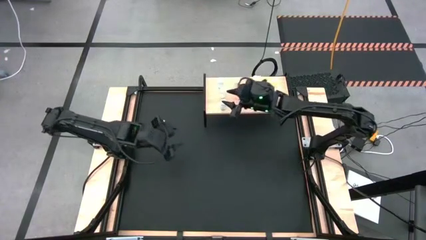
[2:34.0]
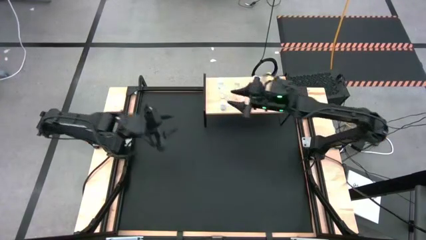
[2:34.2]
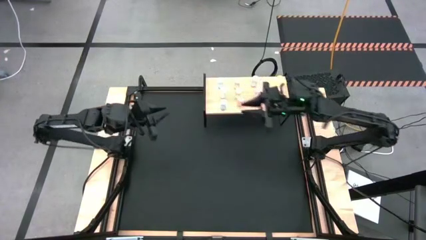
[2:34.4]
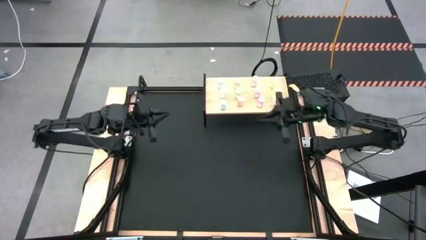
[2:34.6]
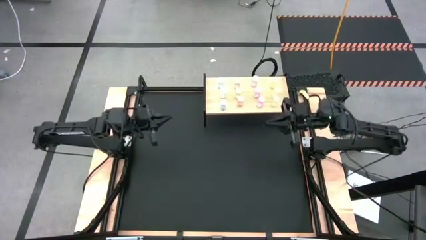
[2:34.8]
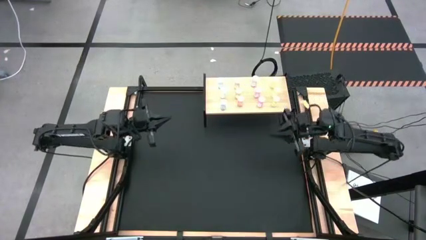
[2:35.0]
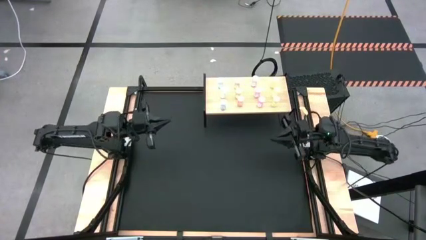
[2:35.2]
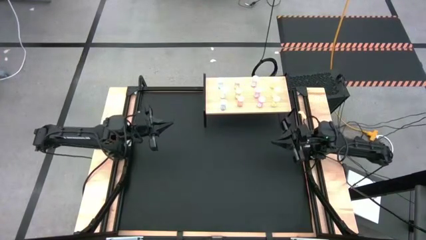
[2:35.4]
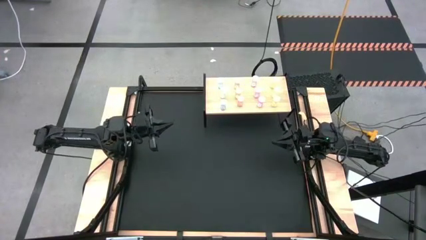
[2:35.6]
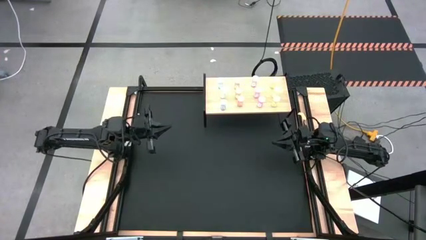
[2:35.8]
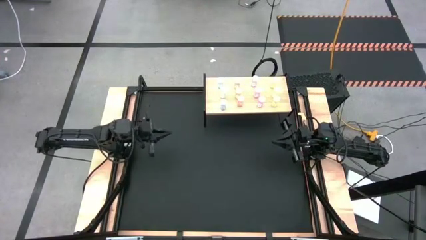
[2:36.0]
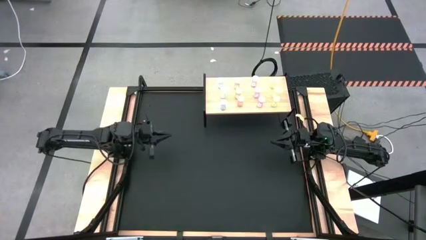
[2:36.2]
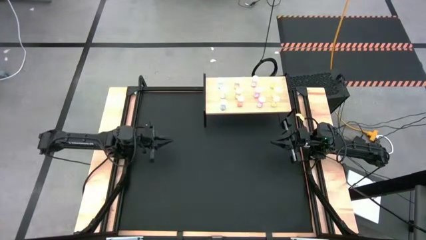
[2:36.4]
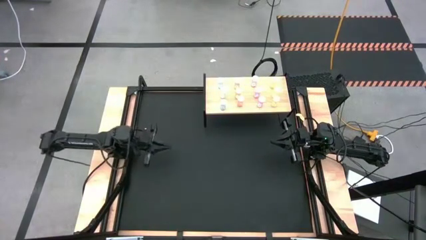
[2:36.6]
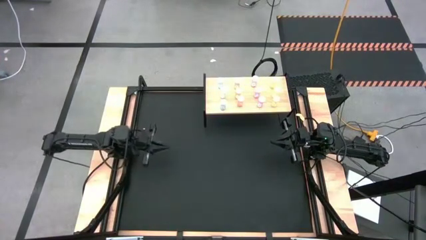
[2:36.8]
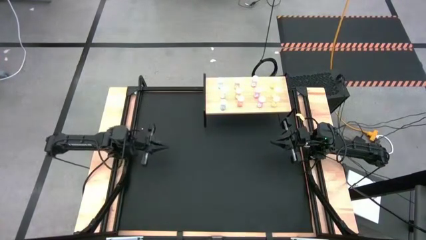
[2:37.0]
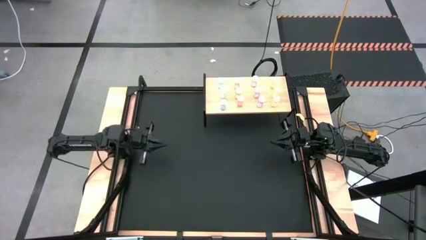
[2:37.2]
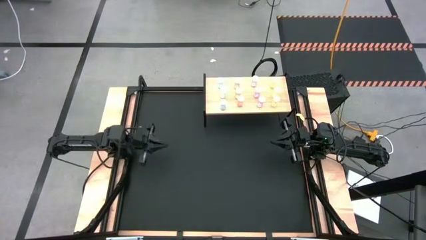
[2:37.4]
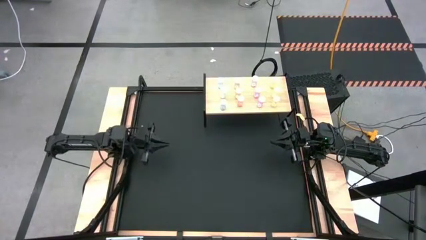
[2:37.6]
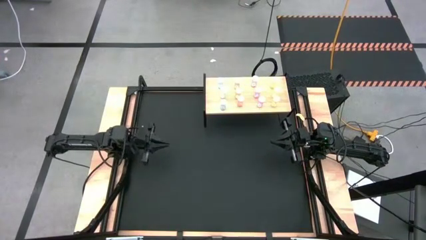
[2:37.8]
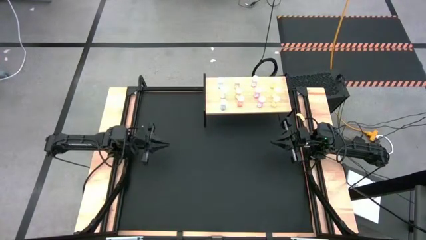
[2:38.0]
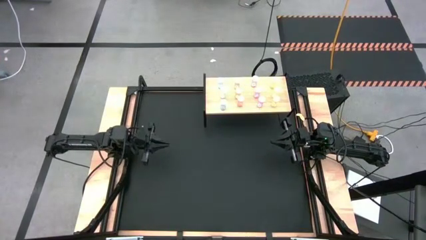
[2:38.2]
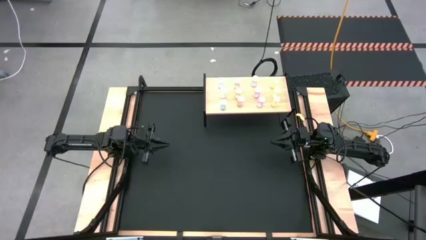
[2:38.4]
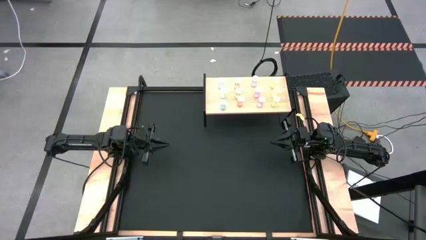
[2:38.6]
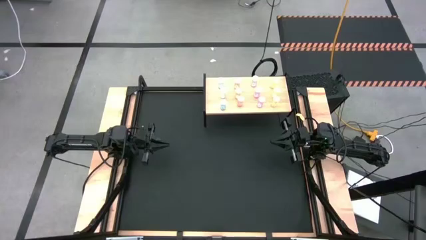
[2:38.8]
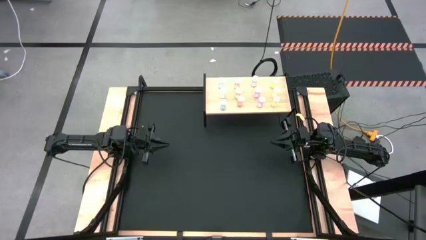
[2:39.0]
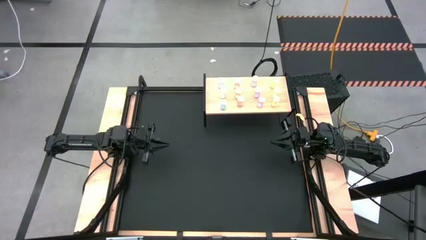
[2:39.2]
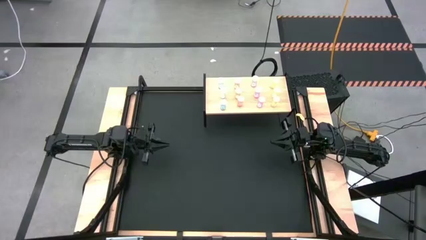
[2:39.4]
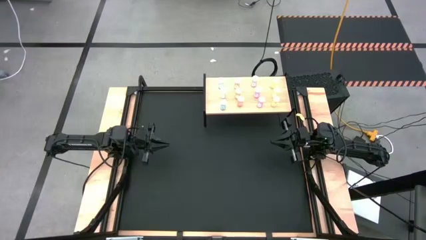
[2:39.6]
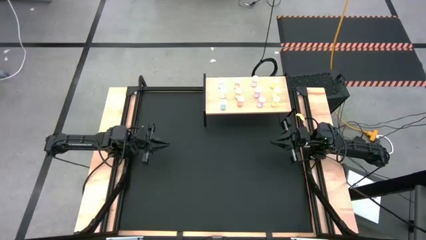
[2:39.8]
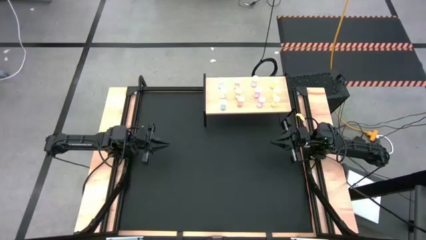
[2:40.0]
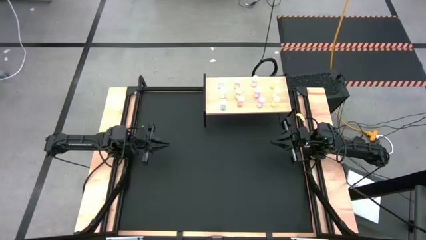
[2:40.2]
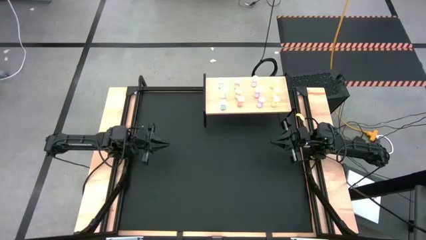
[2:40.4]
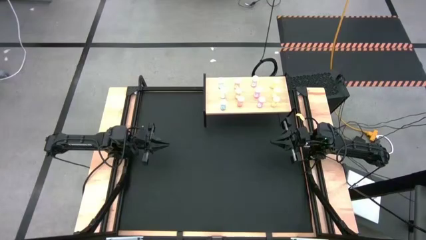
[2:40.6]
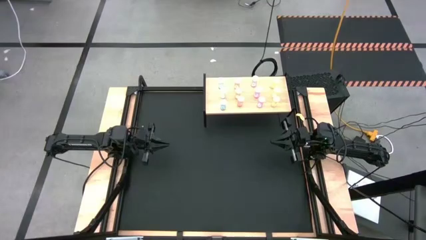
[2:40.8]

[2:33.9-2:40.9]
Task: Pick and place medicine bottles onto shelf by color
Return to Home Position

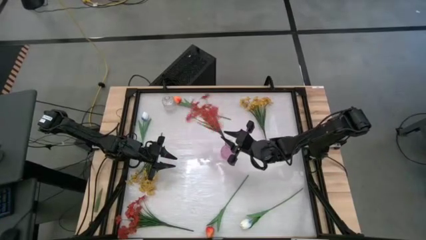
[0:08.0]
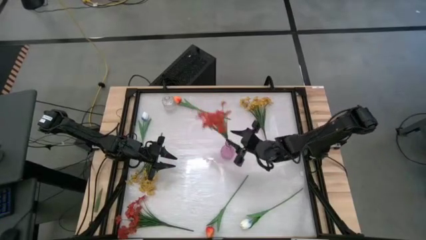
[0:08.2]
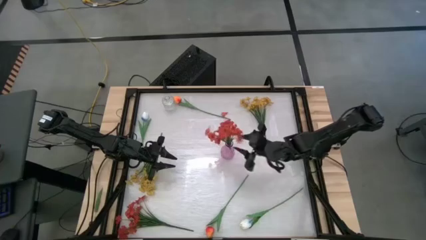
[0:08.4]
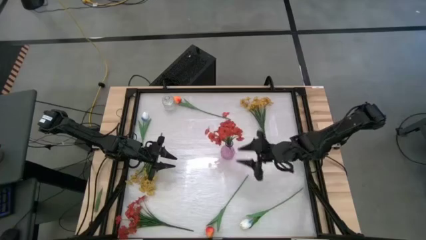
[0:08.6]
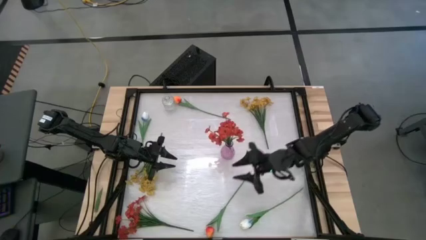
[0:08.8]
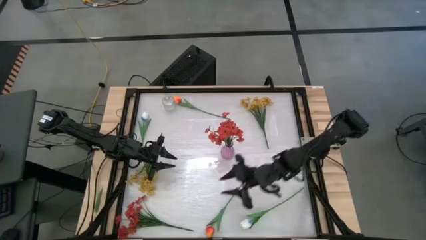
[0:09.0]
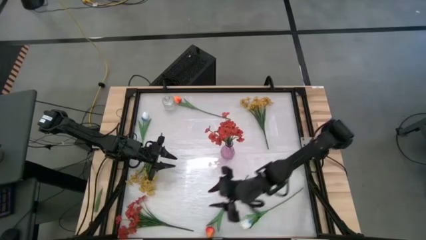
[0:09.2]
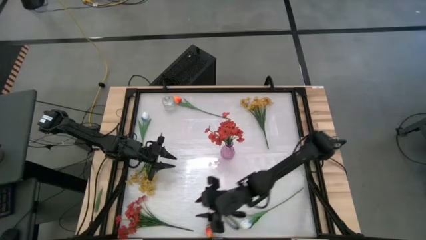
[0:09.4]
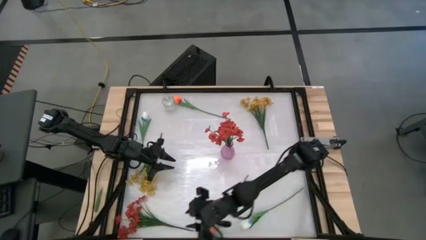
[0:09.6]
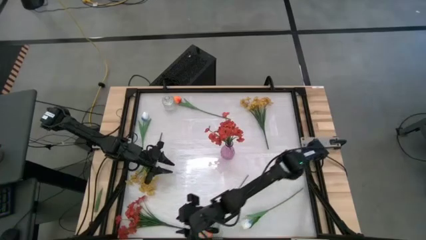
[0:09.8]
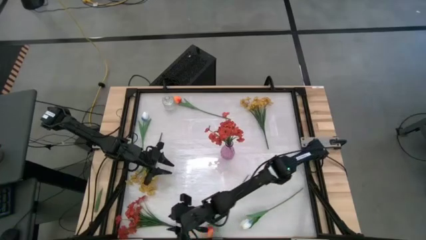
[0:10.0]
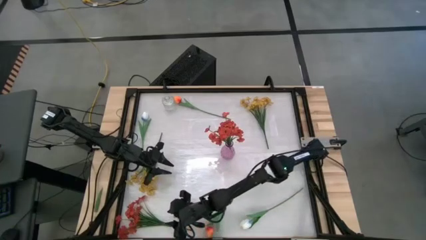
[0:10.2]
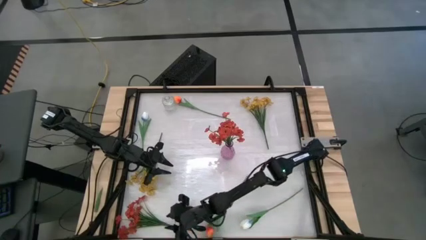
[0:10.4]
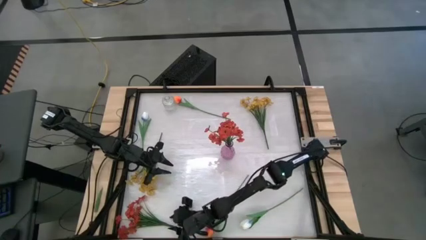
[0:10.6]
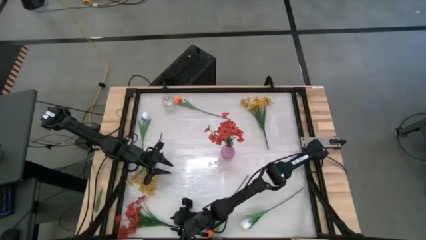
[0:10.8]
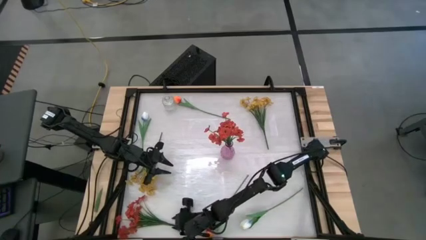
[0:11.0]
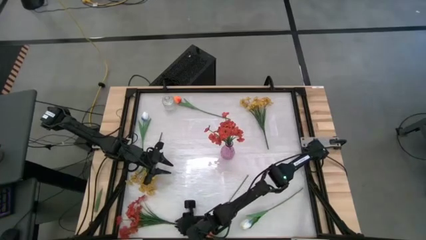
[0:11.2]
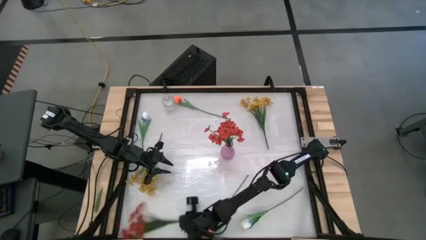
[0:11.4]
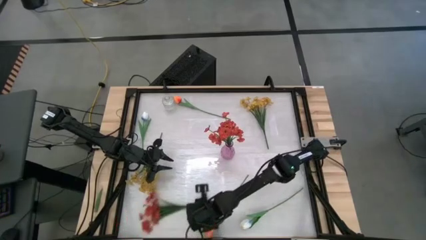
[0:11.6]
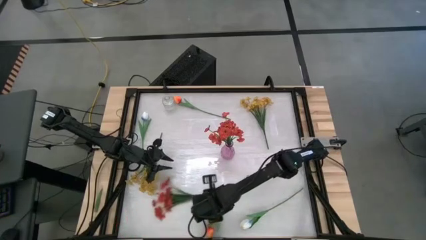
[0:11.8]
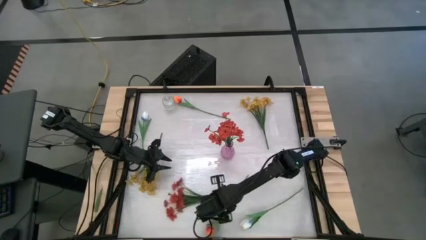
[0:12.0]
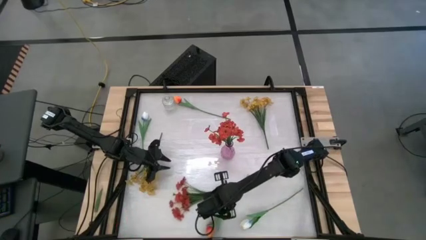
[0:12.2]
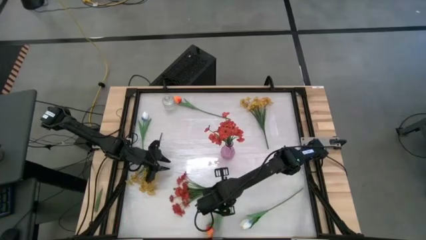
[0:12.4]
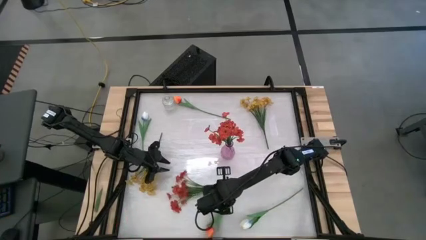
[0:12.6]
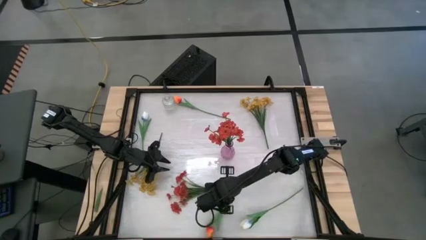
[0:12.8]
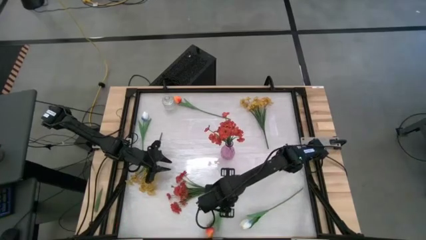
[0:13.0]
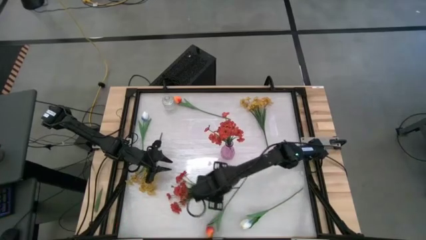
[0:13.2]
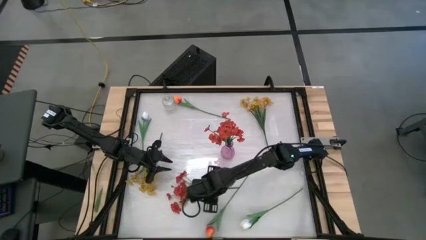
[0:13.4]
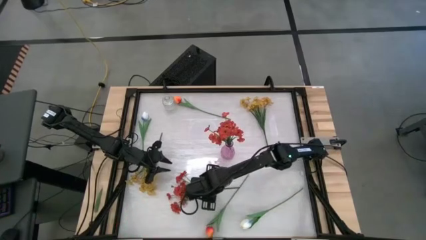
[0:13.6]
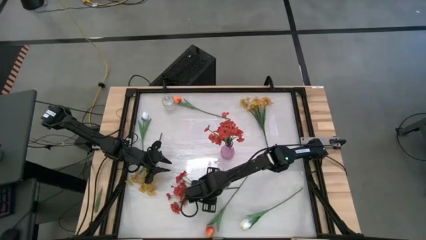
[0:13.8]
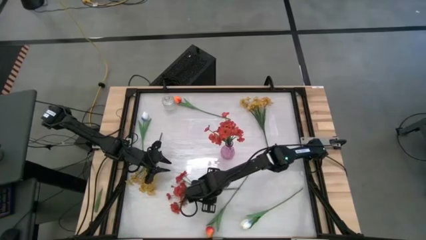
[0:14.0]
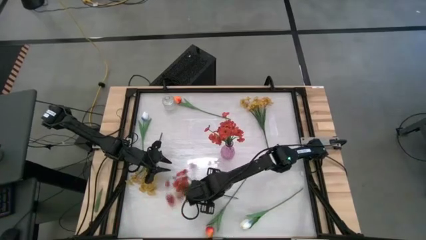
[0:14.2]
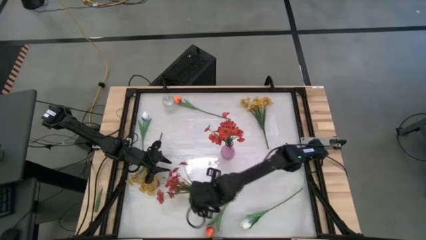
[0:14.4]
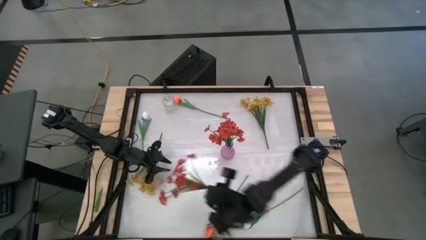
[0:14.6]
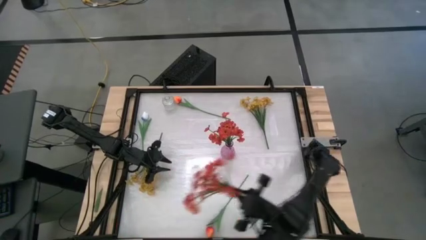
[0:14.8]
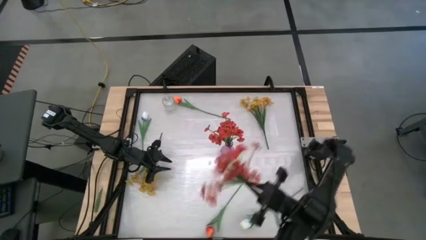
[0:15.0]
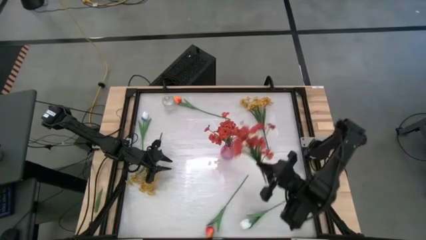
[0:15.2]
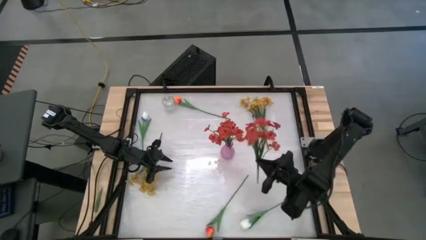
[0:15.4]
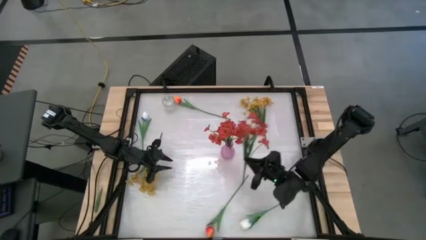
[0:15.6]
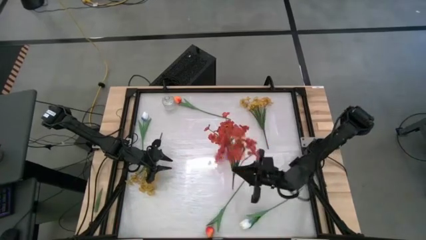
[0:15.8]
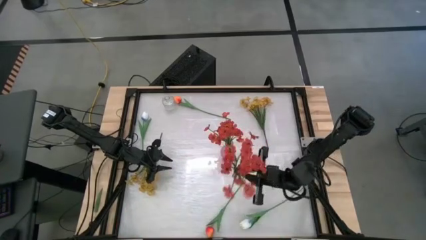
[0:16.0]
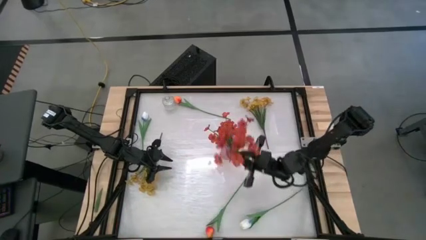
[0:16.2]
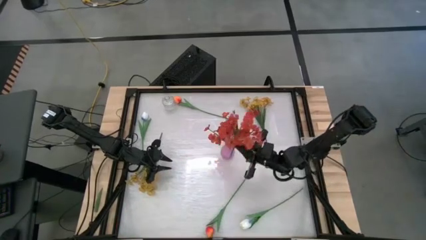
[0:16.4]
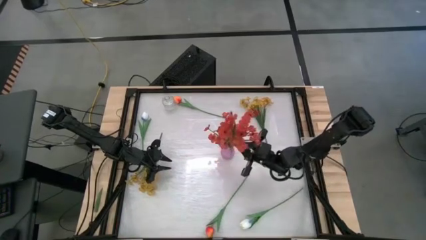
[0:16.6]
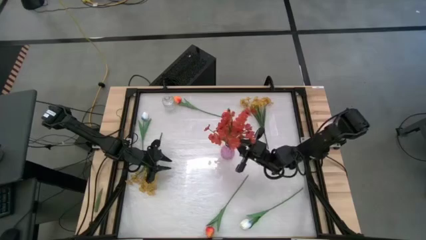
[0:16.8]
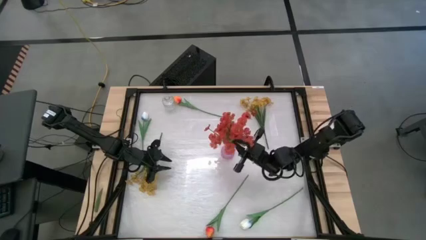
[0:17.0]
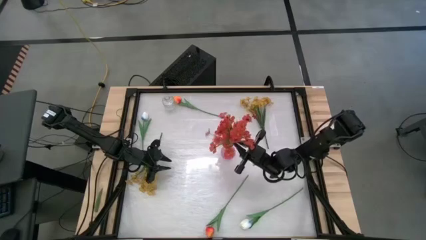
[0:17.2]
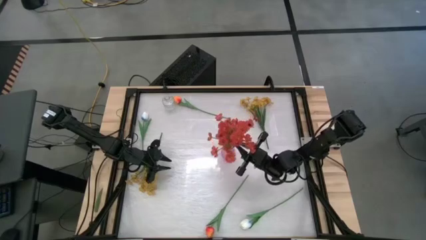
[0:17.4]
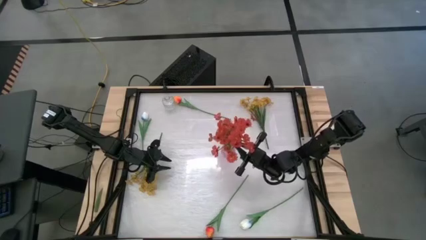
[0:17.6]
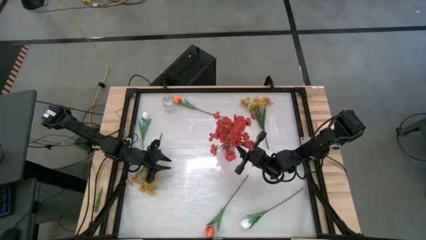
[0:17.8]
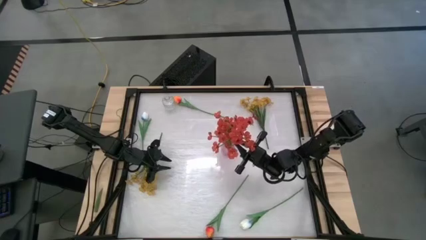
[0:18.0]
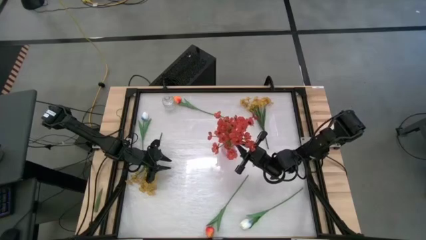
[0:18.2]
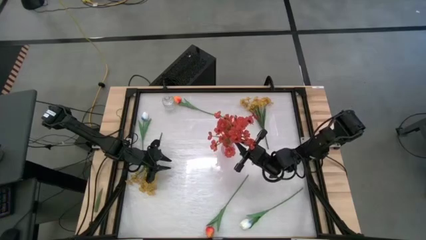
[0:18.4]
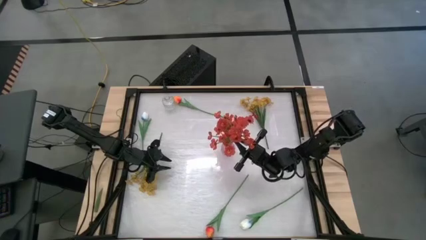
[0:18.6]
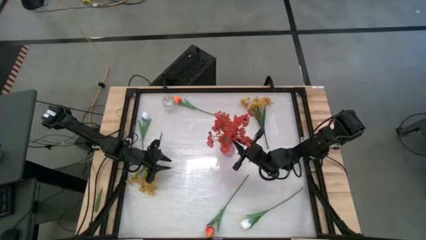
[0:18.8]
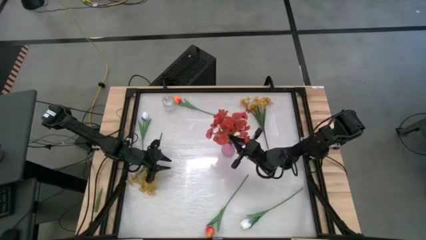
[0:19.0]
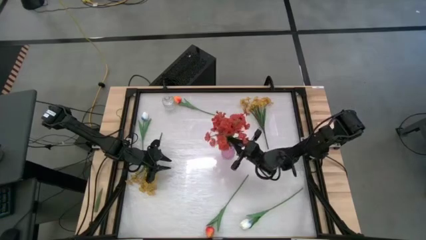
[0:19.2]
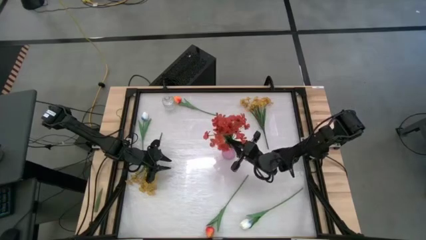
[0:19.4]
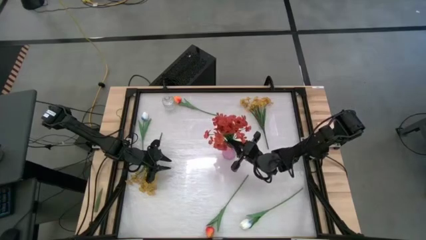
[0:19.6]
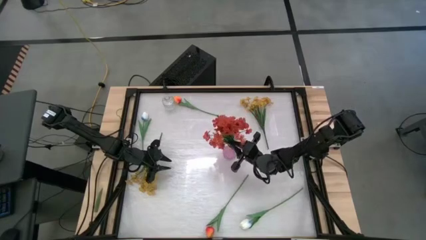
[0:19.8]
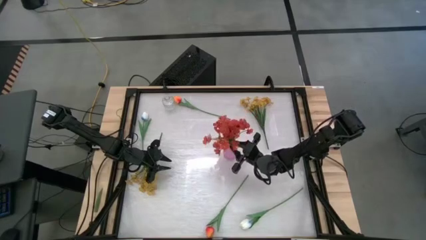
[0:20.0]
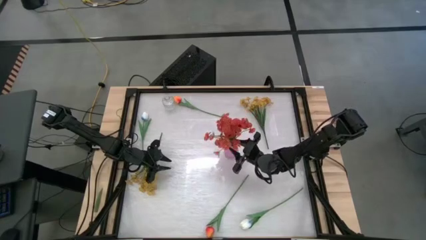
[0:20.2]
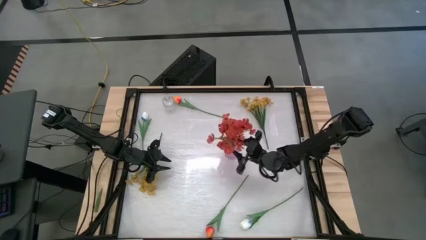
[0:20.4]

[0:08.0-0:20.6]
Task: Sort flowers into vase by color
Put the red flowers into the violet vase
